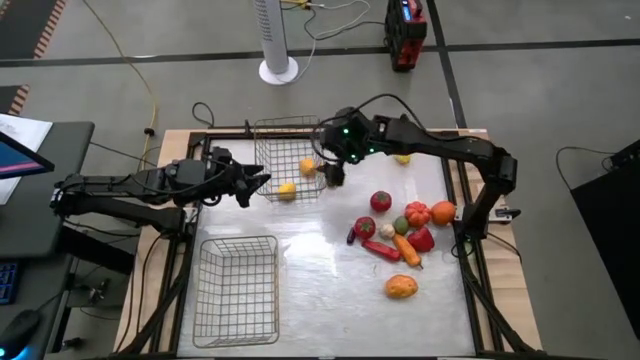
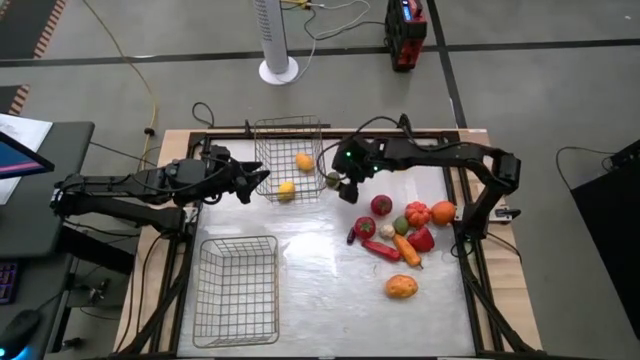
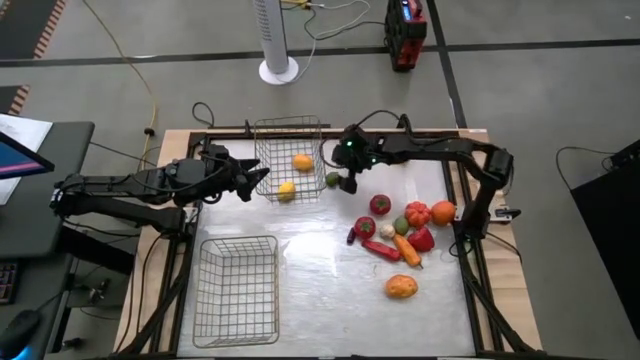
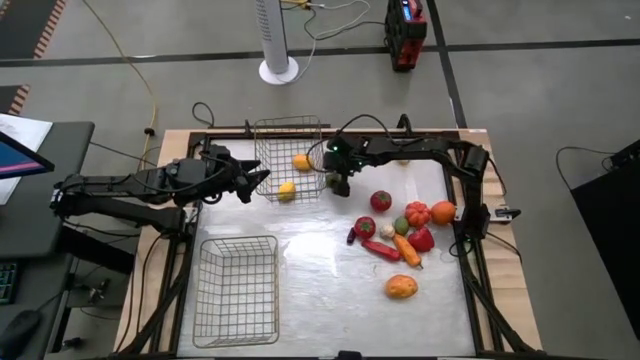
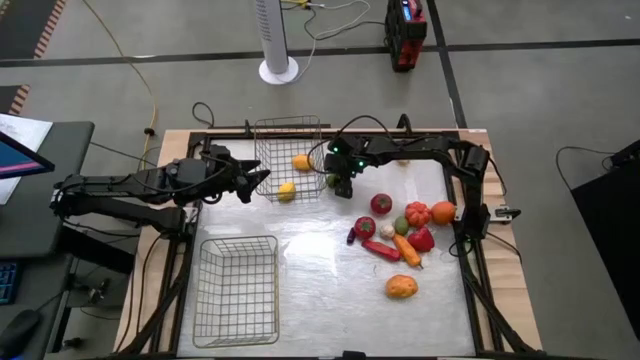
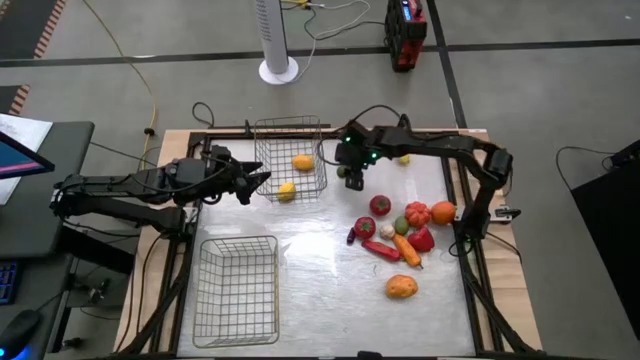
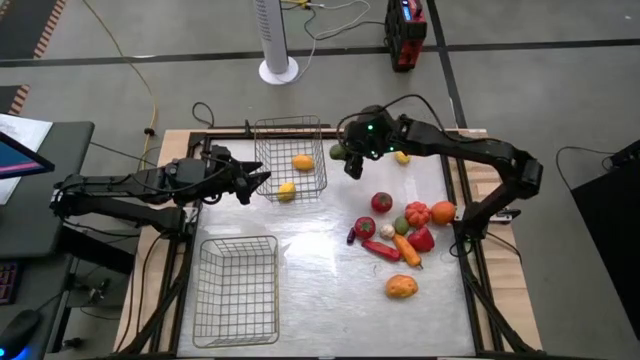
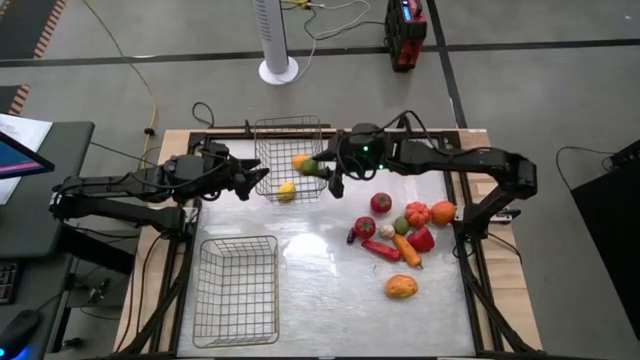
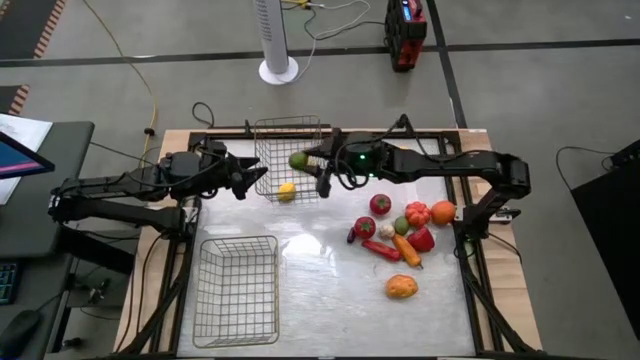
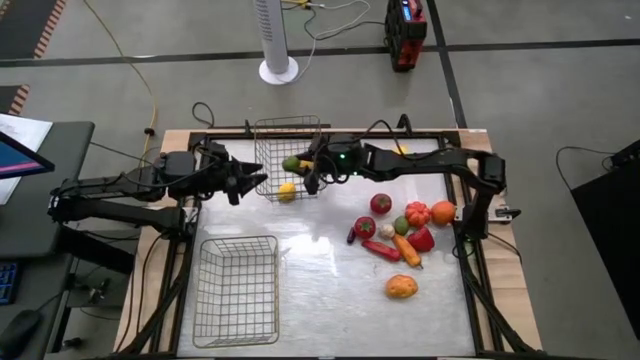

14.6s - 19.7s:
Task: Sort produce into baskets
Put the top green lime into the top wire basket

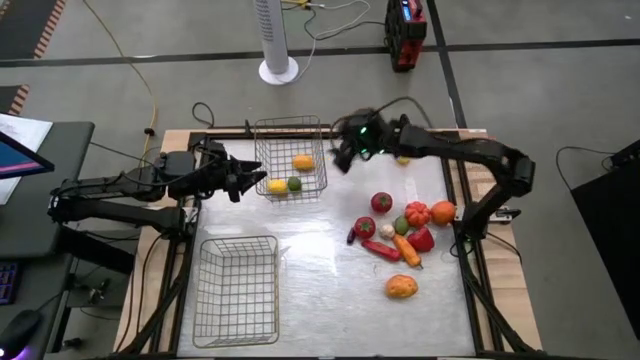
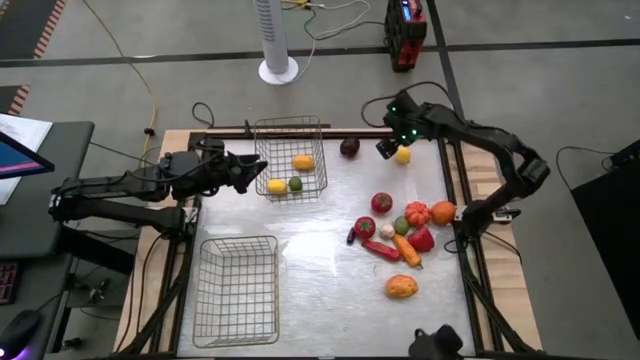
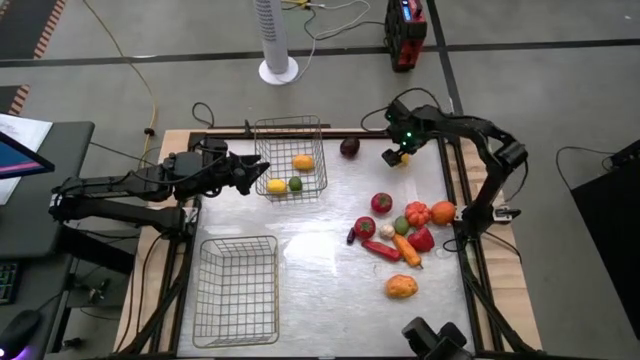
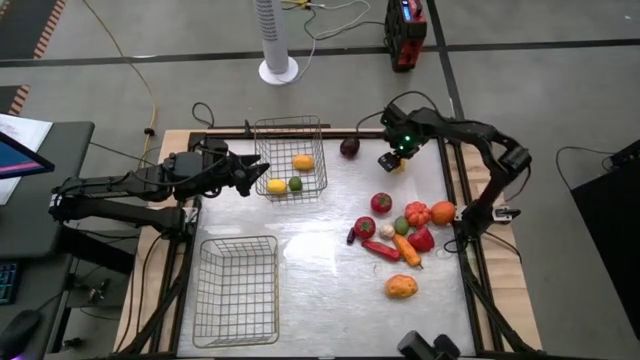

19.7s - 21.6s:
Put the yellow lemon into the top wire basket

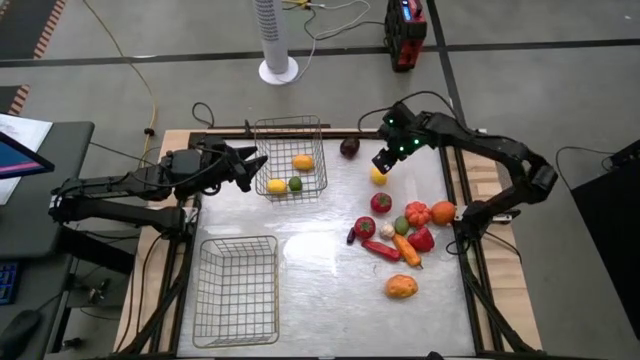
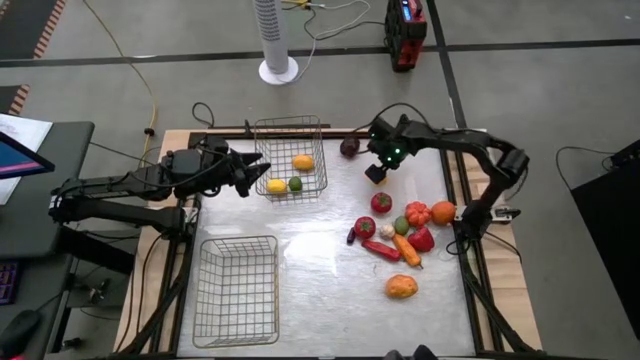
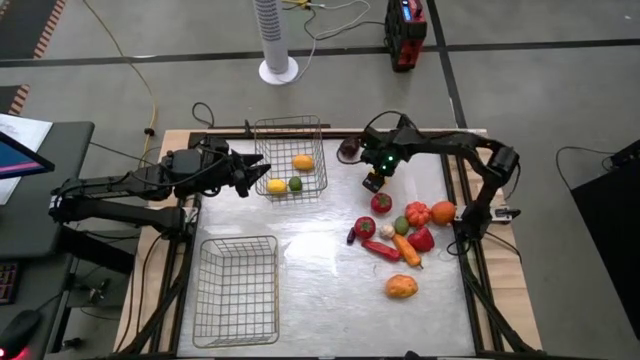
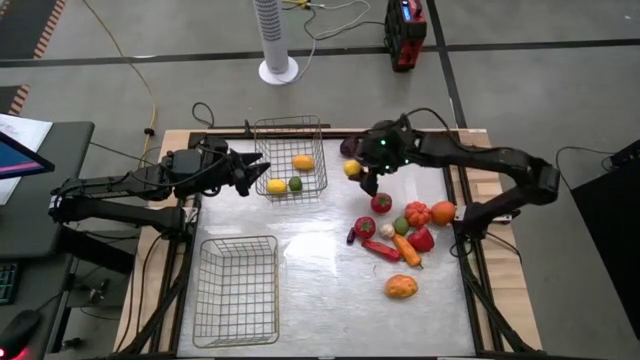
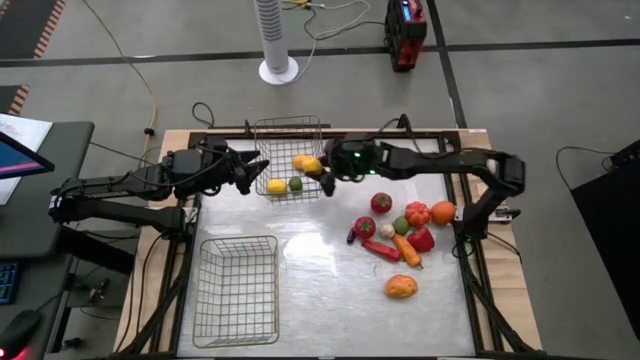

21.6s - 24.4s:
Put the yellow lemon into the top wire basket

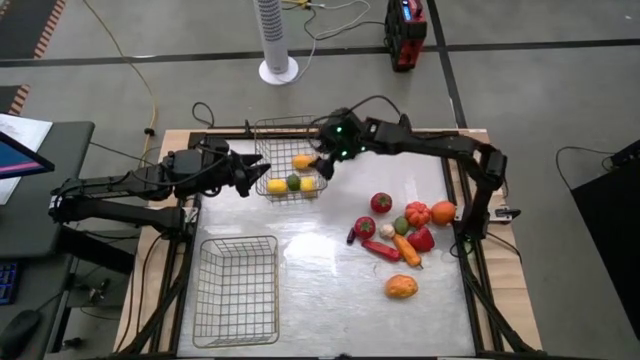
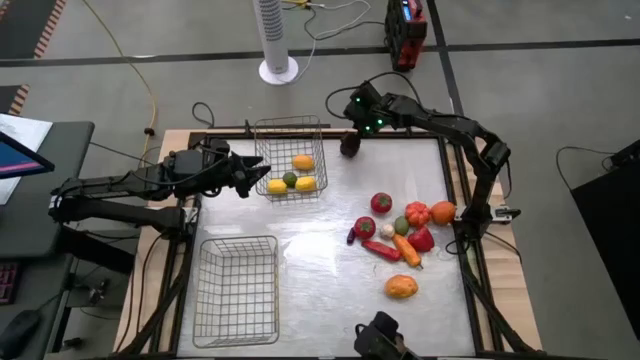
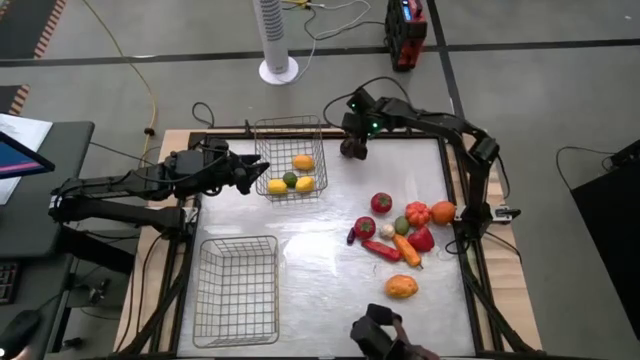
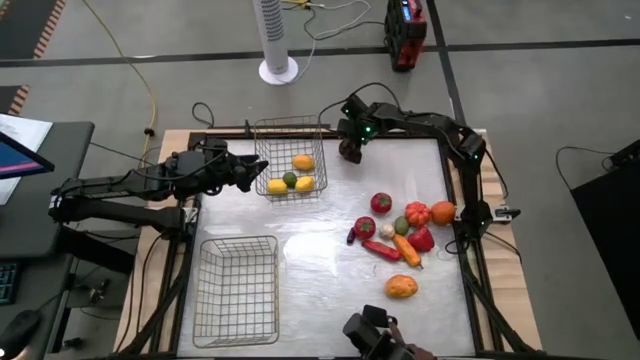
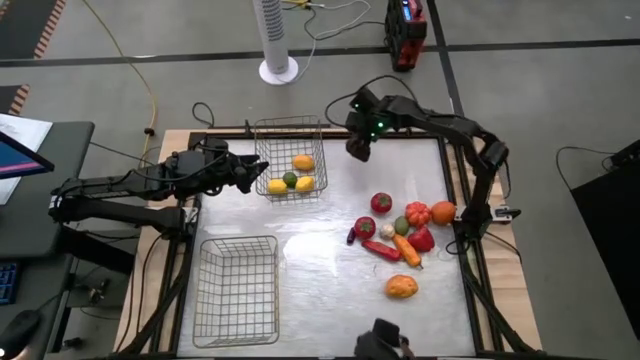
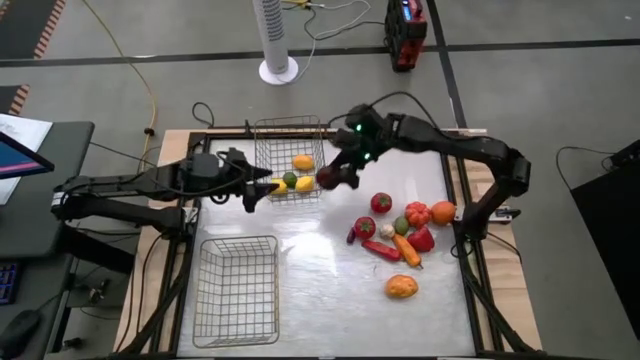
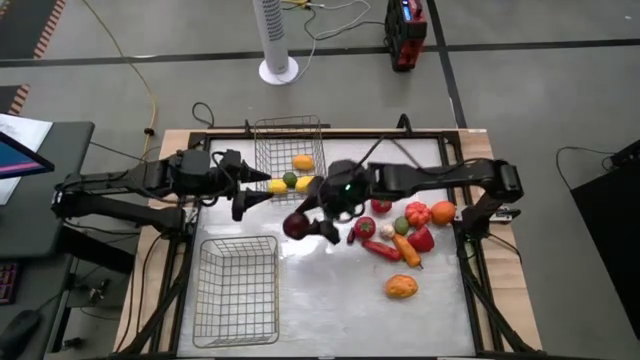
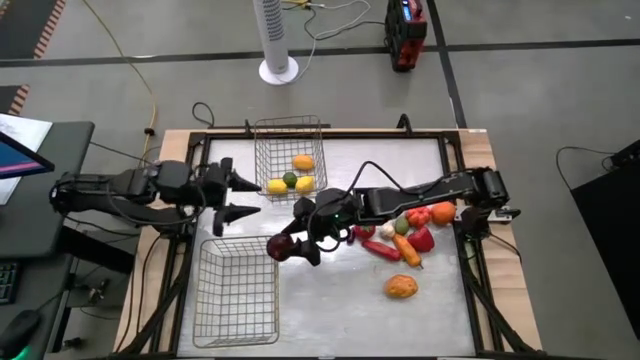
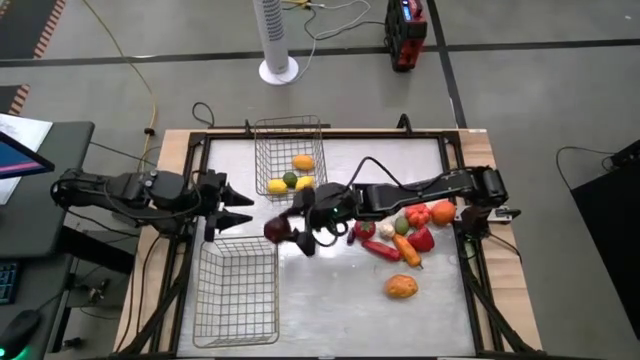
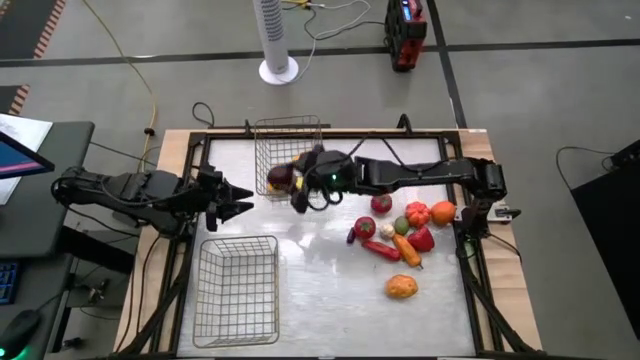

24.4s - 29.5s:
Put the red apple into the top wire basket

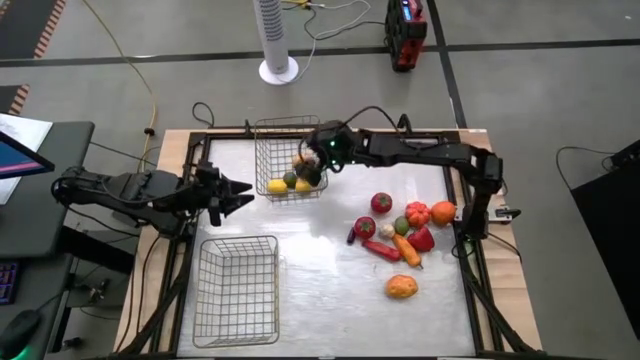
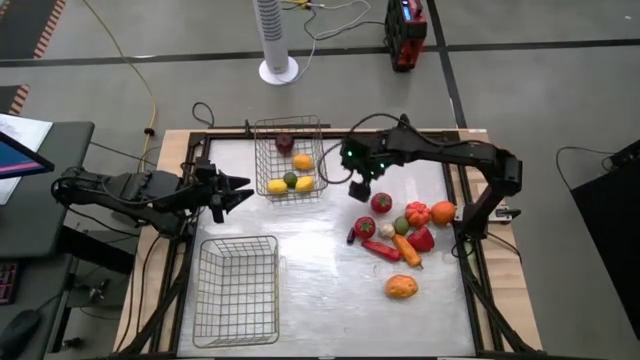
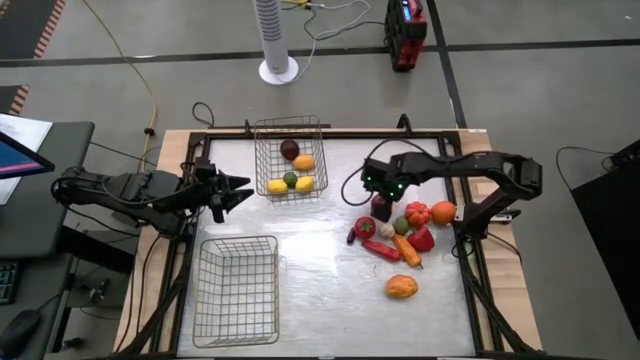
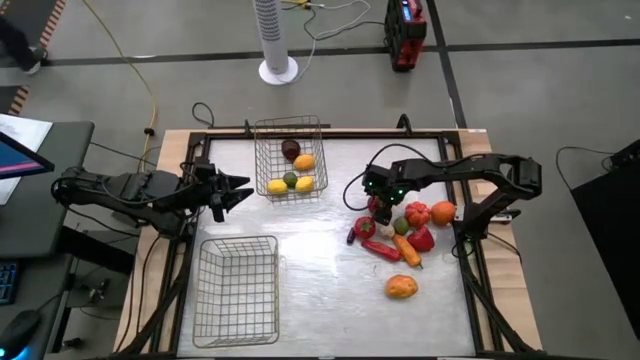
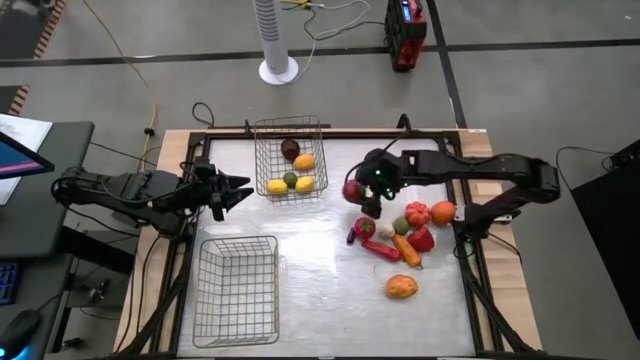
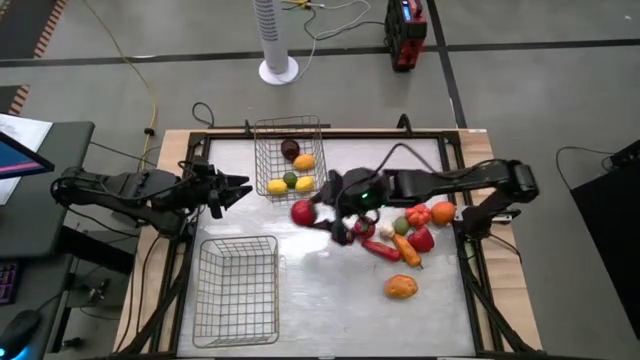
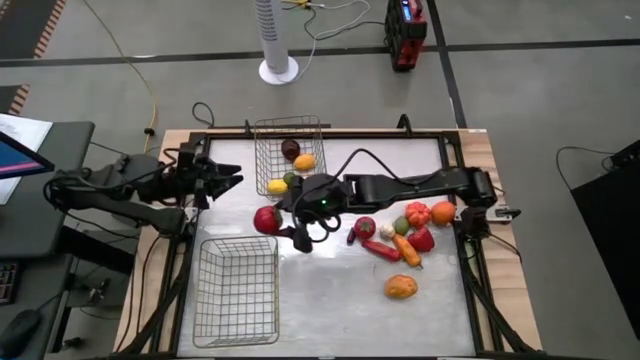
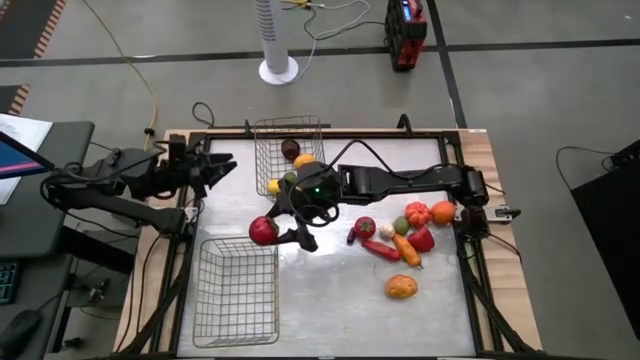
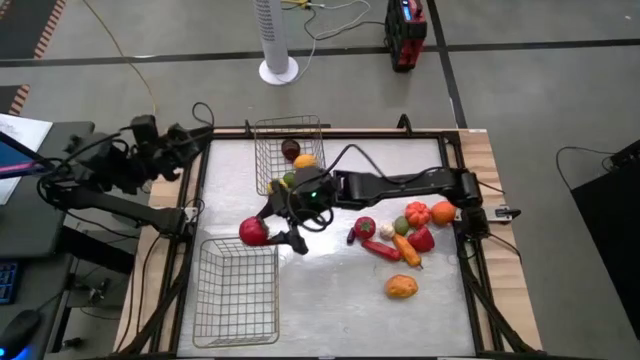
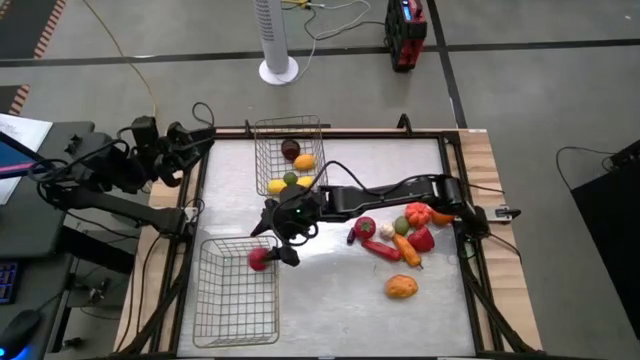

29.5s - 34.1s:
Put the top red tomato into the bottom wire basket

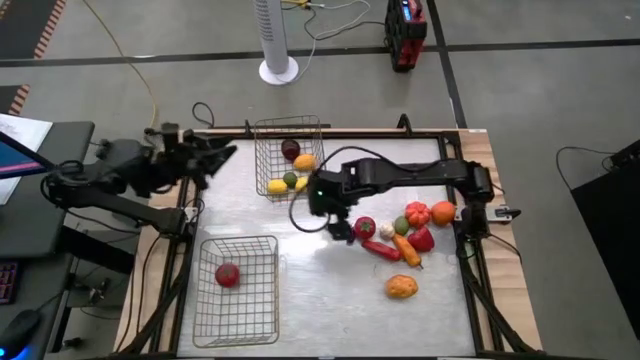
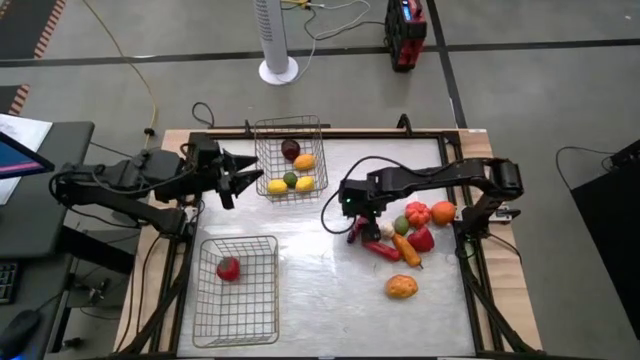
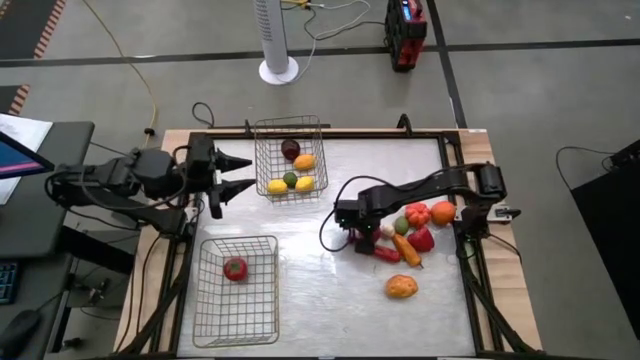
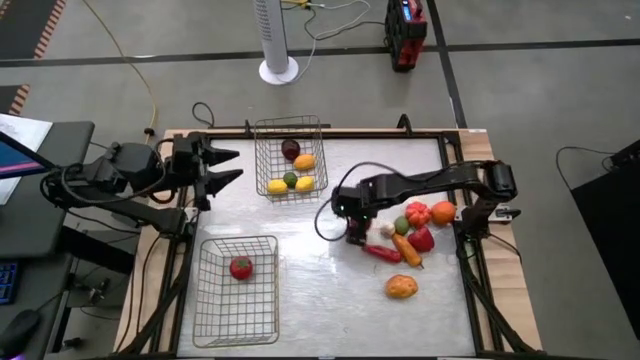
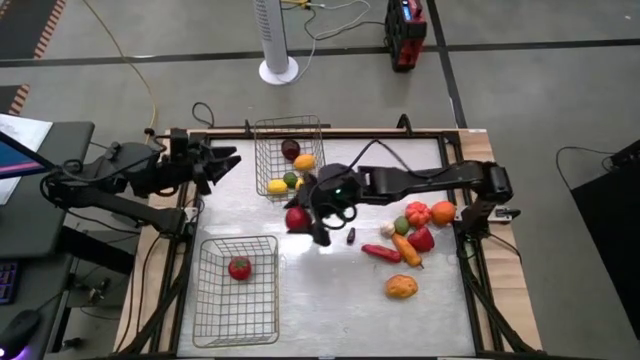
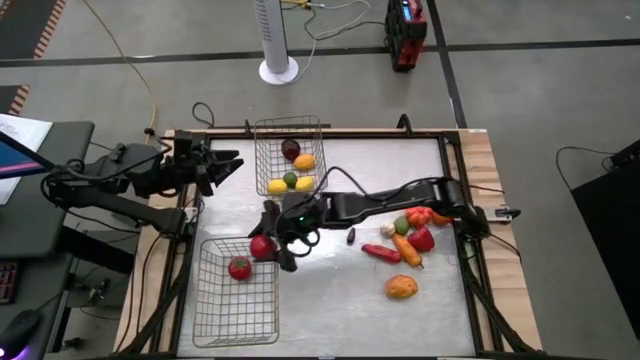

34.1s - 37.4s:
Put the red tomato into the bottom wire basket
